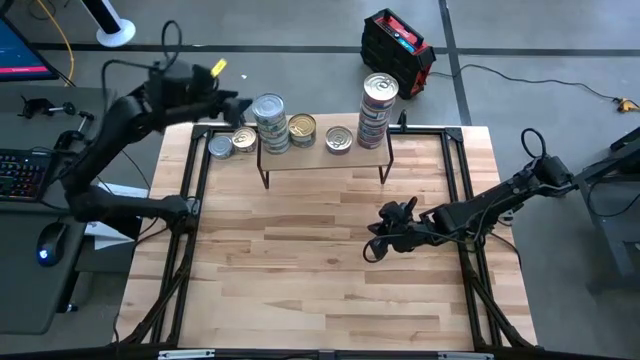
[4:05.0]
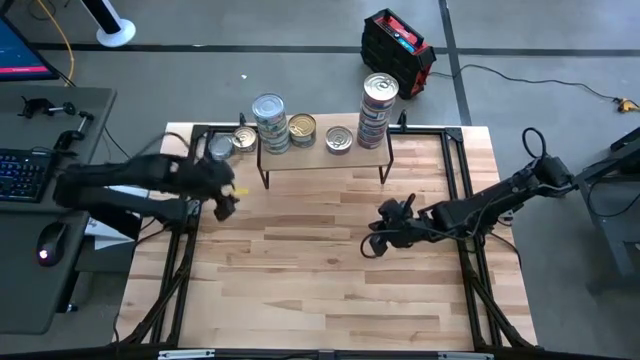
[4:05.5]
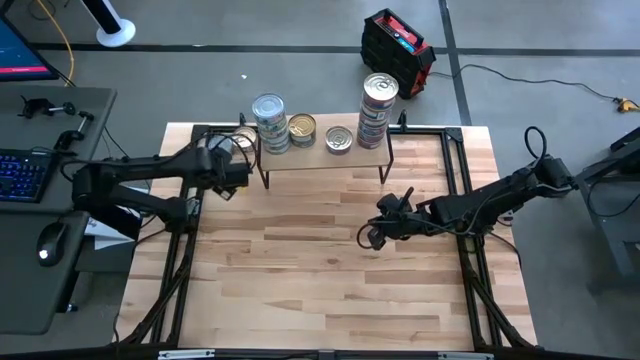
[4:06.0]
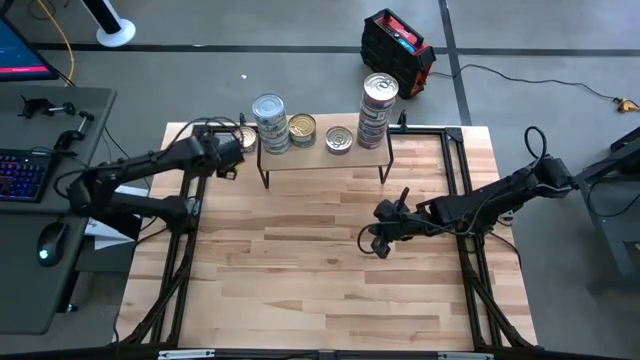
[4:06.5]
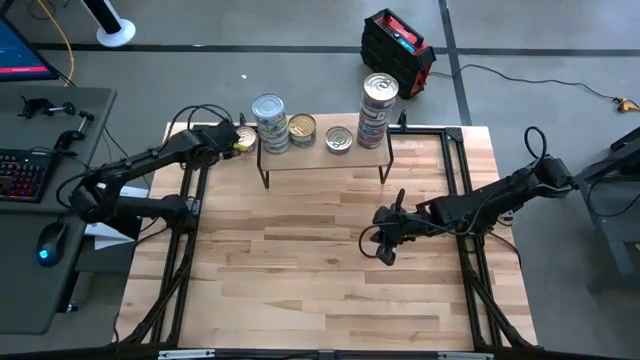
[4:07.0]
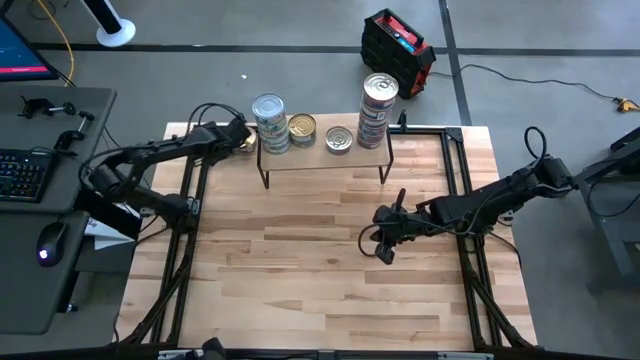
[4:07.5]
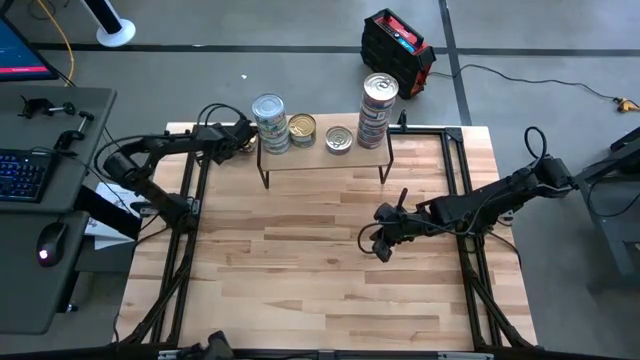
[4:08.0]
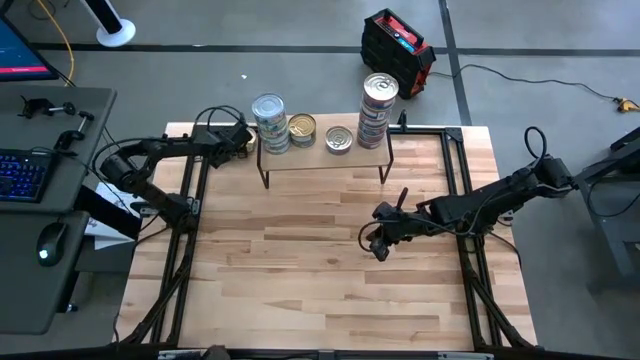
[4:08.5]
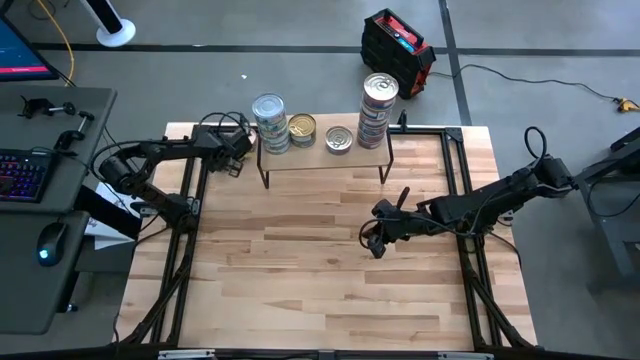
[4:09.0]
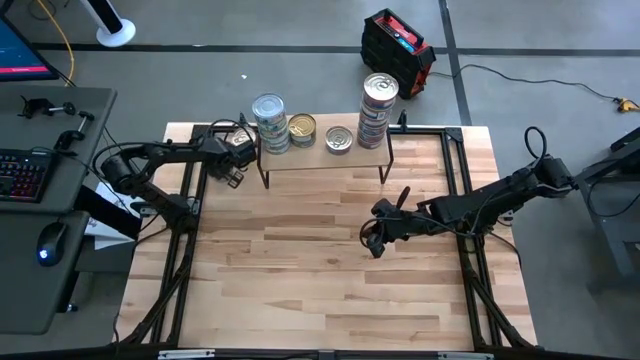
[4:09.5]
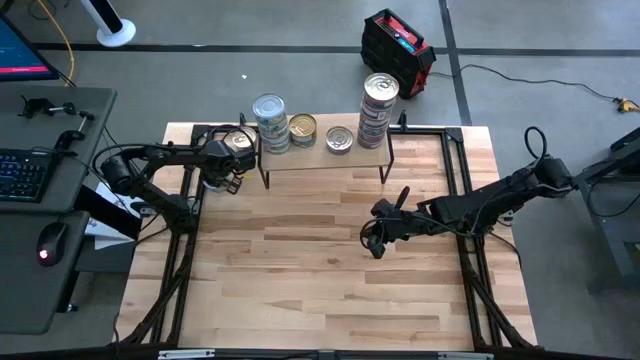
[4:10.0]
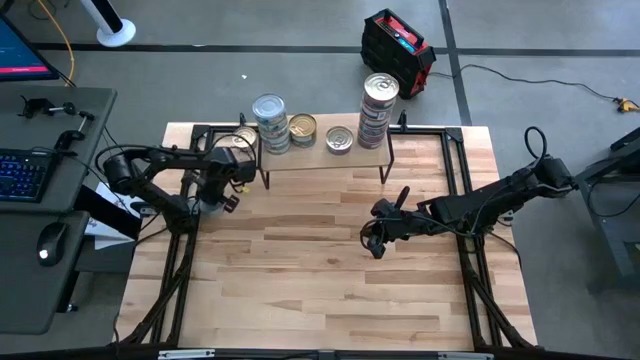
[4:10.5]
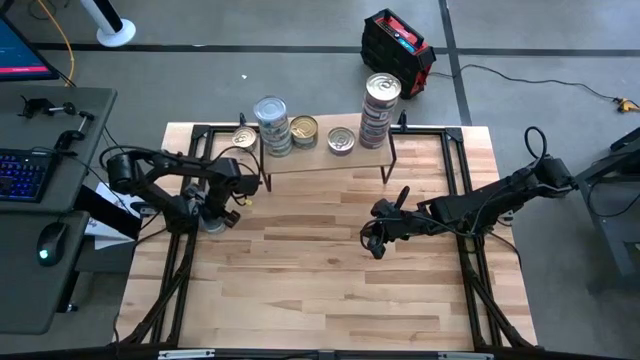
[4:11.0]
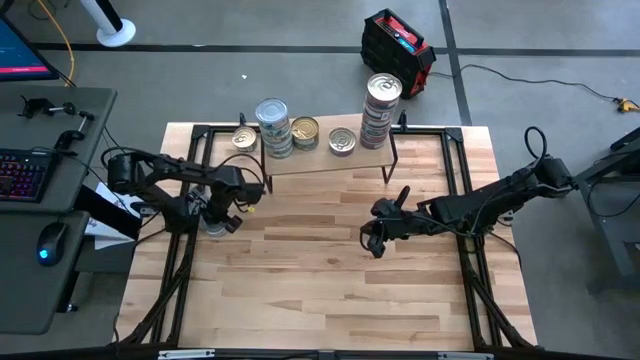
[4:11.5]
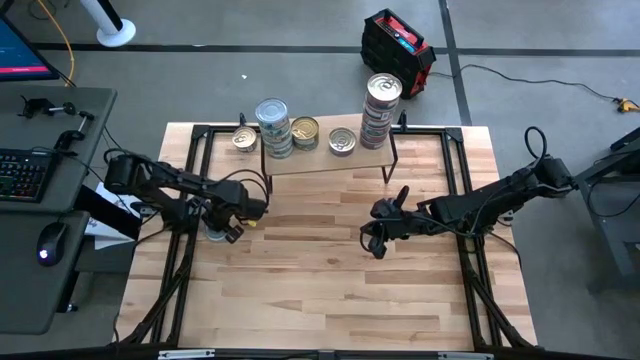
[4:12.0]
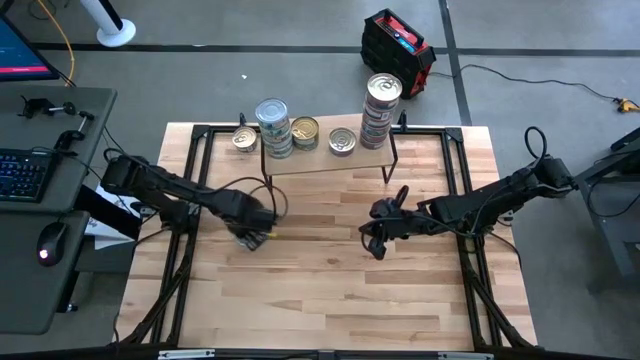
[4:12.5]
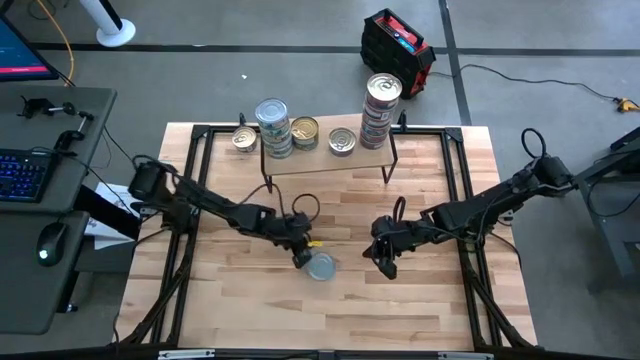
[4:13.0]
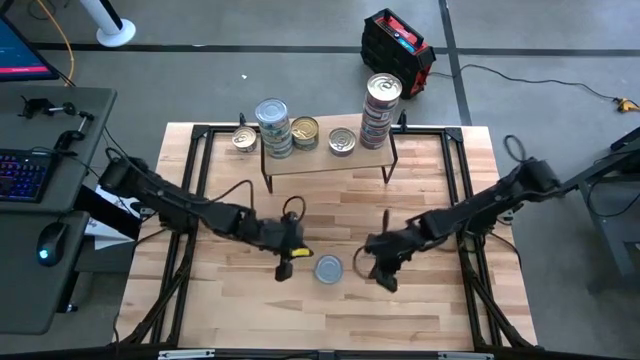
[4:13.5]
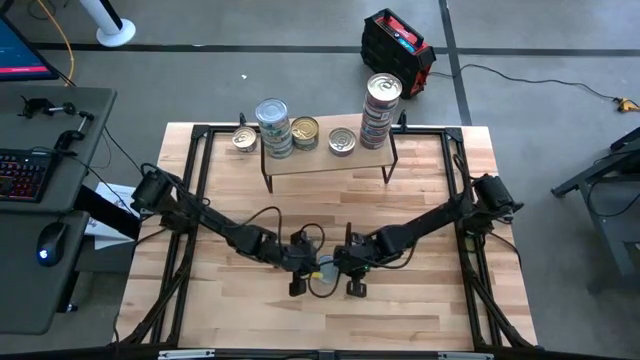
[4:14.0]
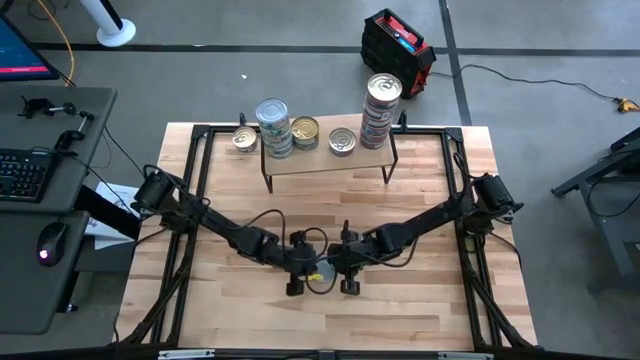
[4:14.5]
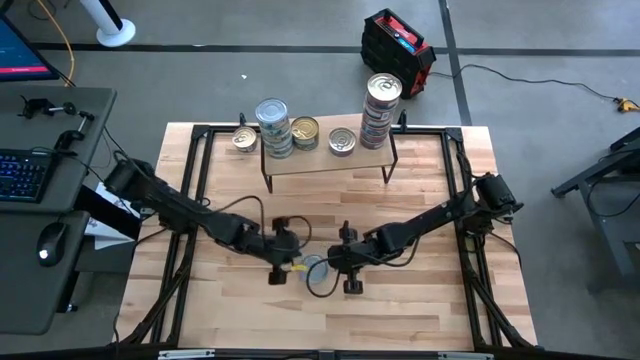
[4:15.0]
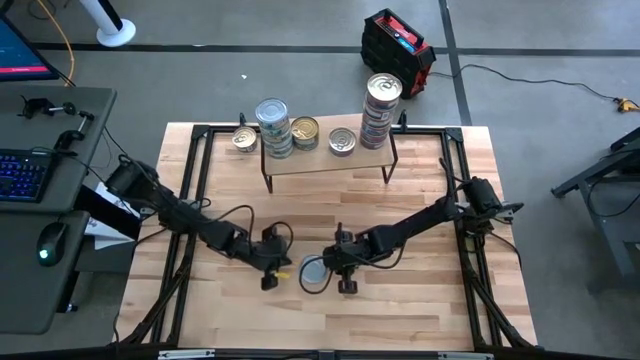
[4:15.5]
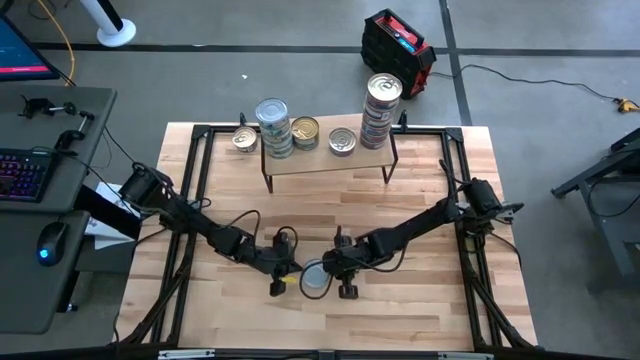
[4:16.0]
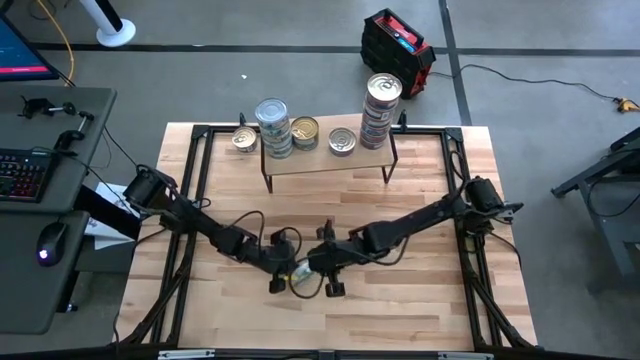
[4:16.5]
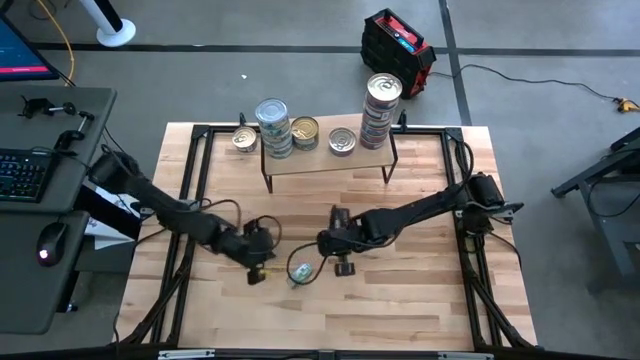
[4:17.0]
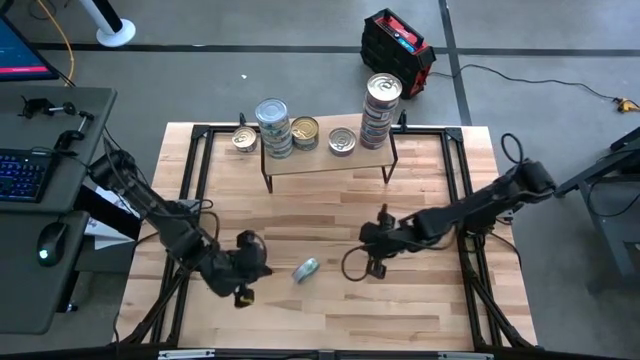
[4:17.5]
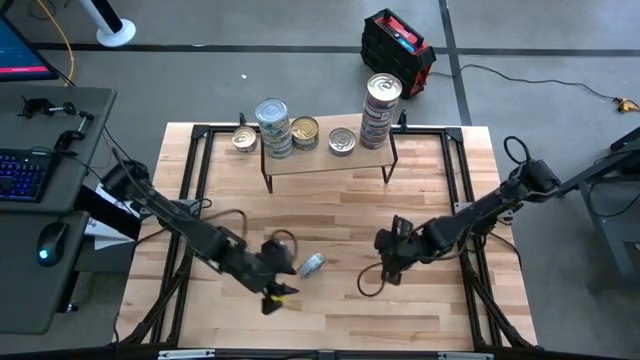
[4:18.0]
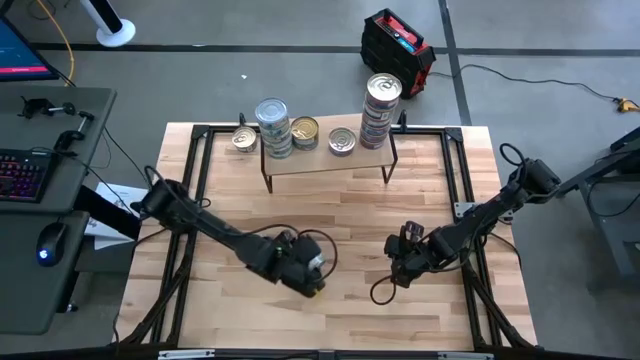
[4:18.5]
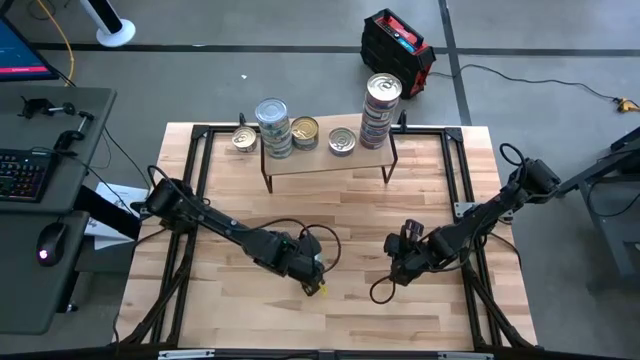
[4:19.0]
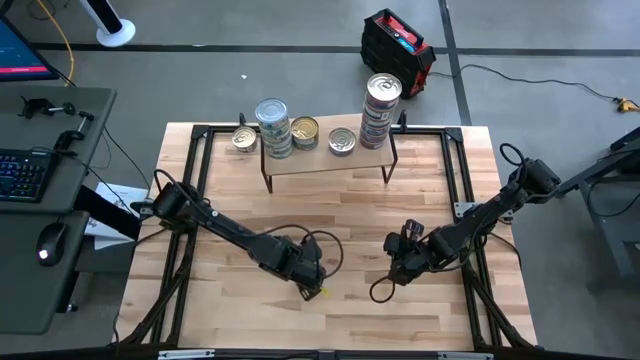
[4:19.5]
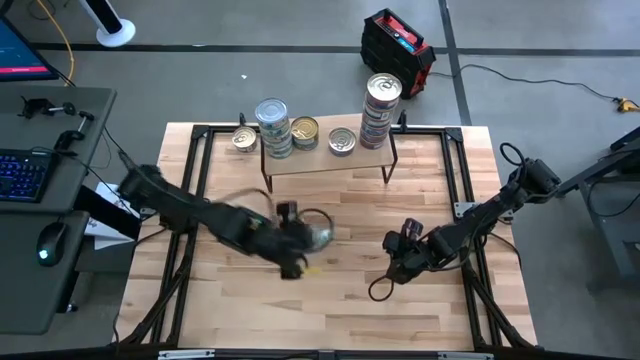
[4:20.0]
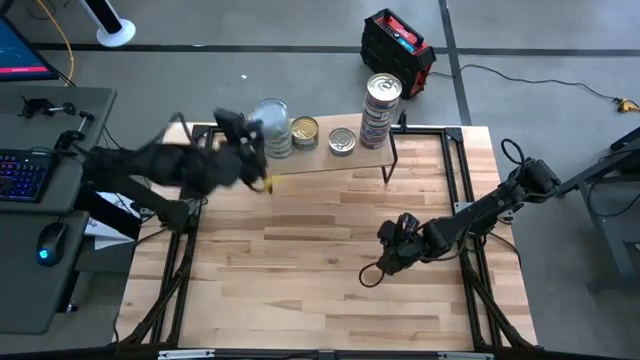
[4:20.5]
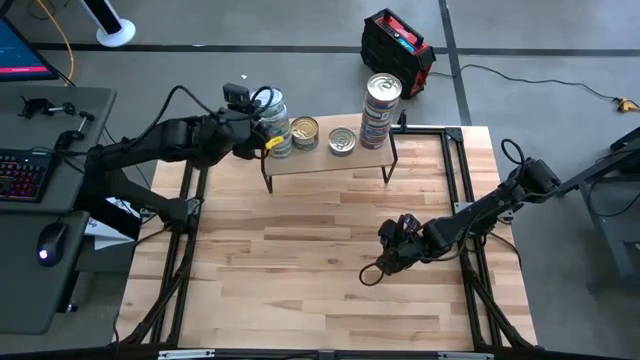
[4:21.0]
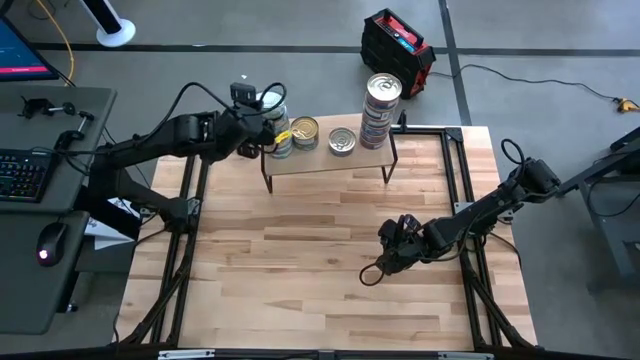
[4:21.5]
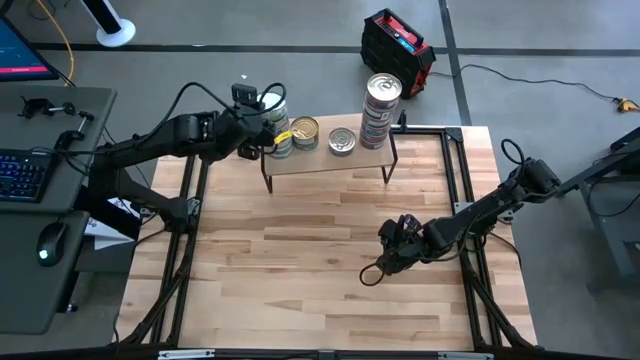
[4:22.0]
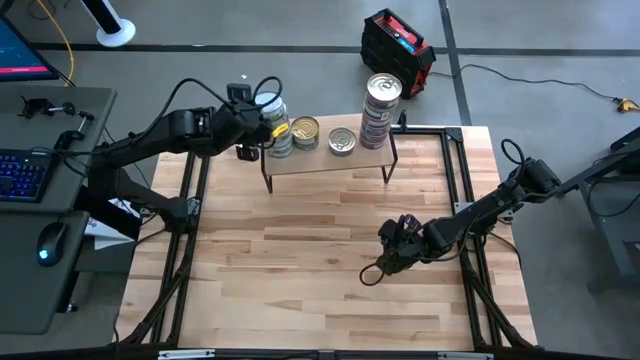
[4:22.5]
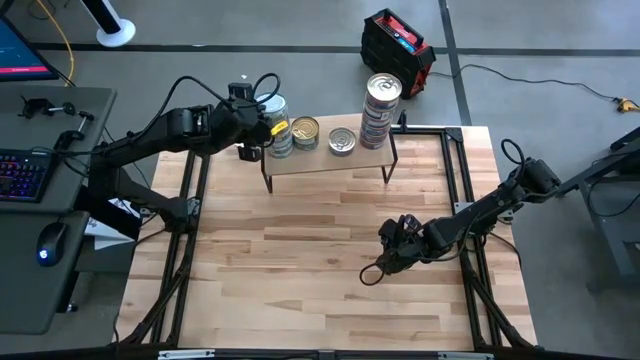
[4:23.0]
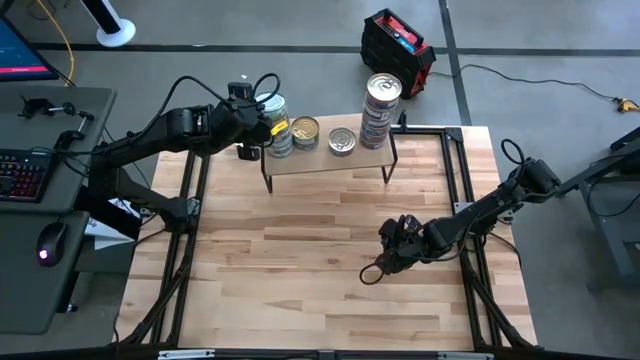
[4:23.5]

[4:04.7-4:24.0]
Task: Stack canned seafood by type on shelf
Stack the green white tuna can on top of the other green white tuna cans on the shelf

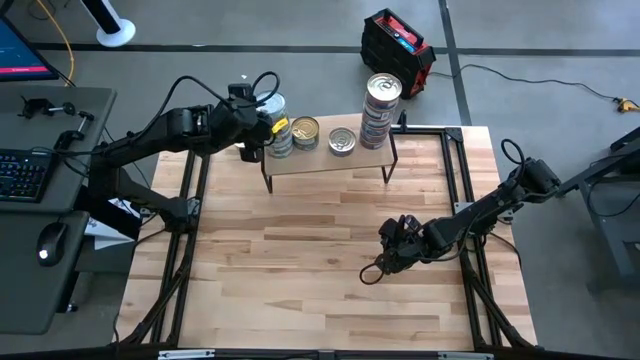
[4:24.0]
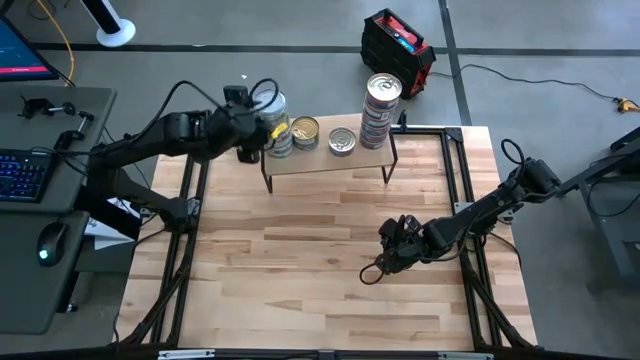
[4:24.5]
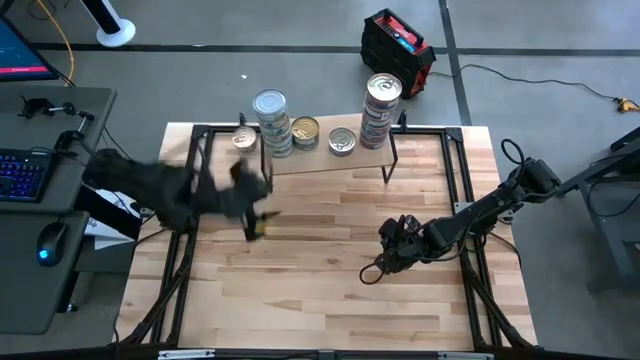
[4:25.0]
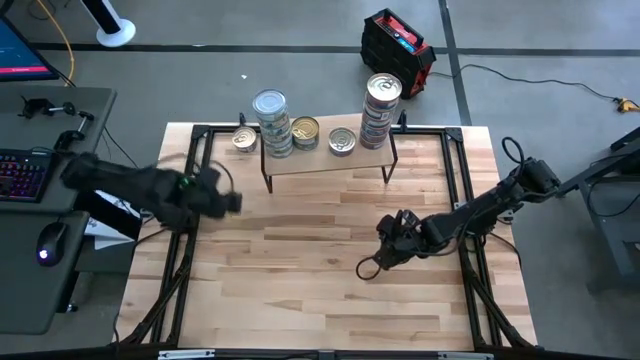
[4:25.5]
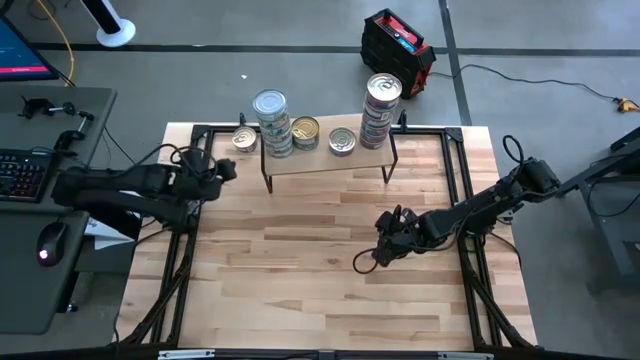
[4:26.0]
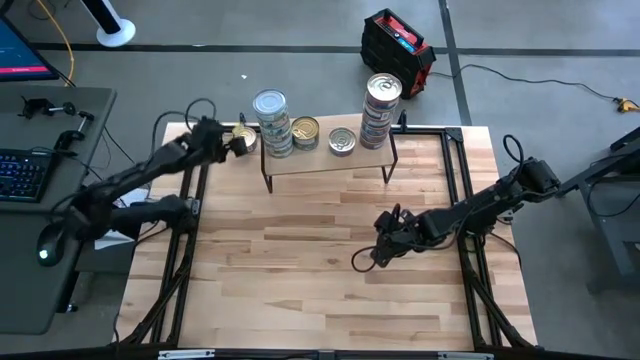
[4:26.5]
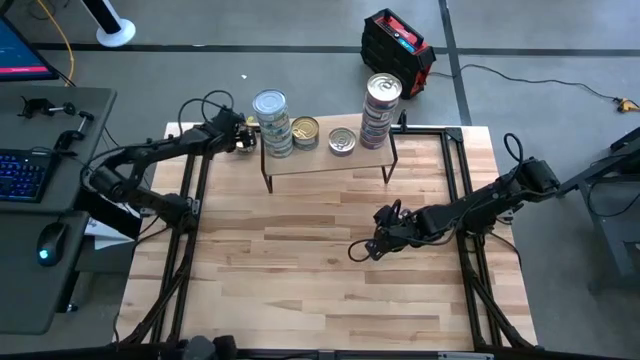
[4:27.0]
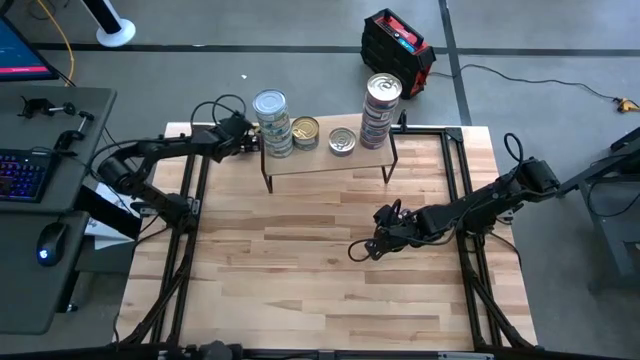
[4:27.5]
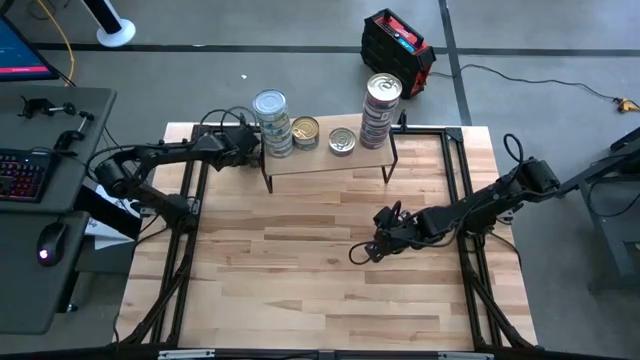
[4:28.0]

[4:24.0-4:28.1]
Stack the blue pink tuna can on top of the other blue pink tuna cans on the shelf
